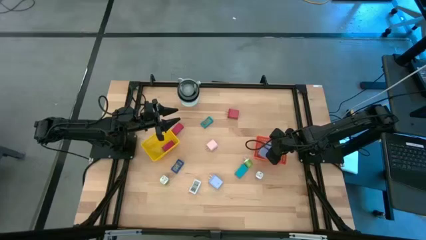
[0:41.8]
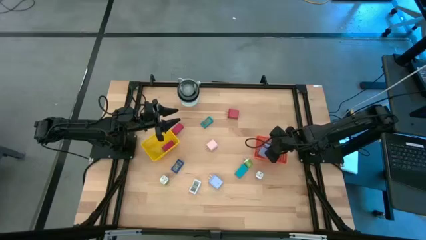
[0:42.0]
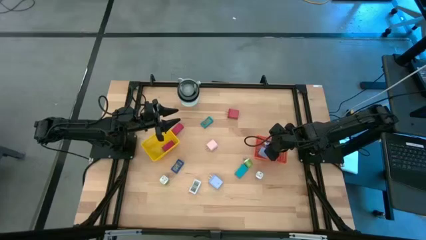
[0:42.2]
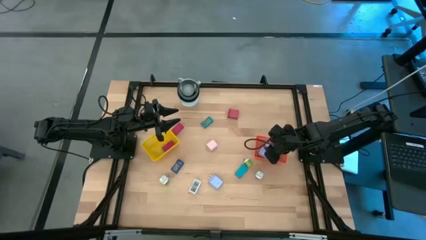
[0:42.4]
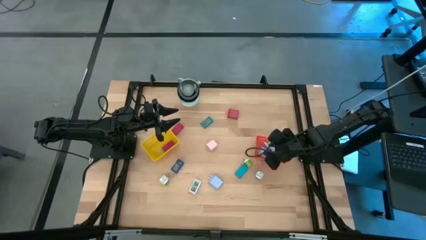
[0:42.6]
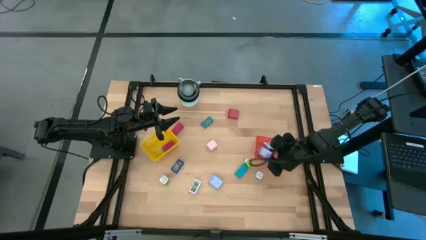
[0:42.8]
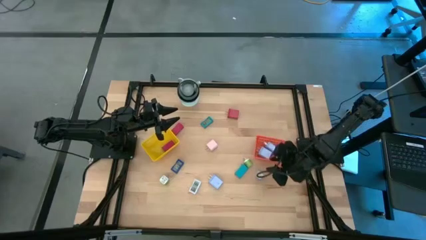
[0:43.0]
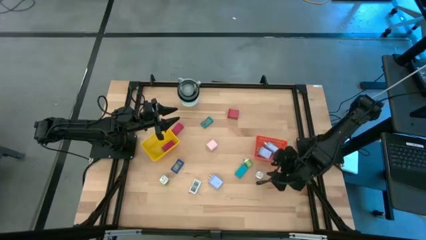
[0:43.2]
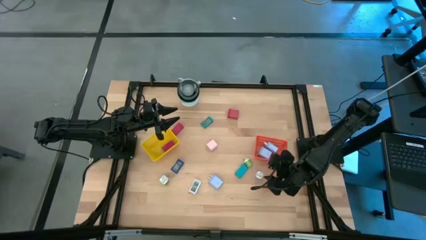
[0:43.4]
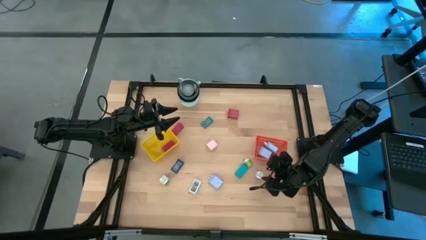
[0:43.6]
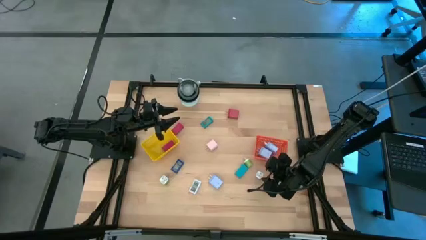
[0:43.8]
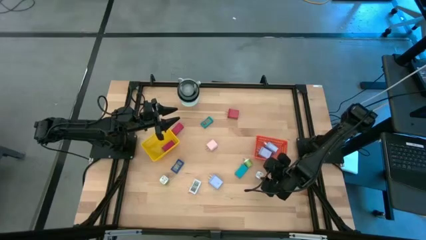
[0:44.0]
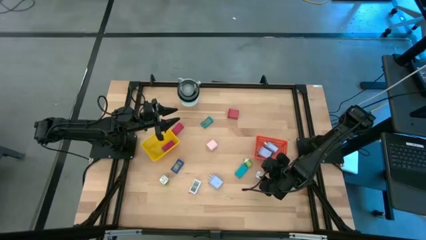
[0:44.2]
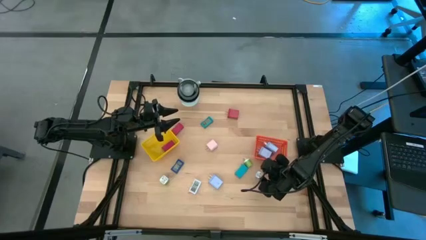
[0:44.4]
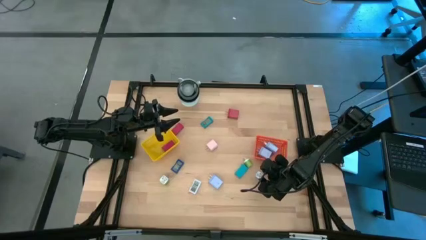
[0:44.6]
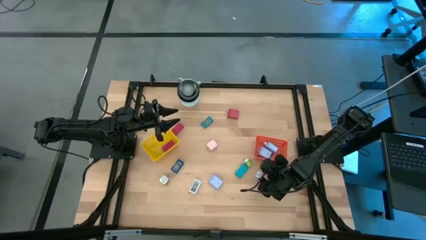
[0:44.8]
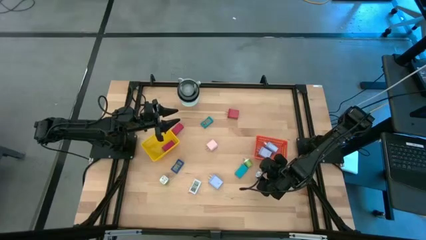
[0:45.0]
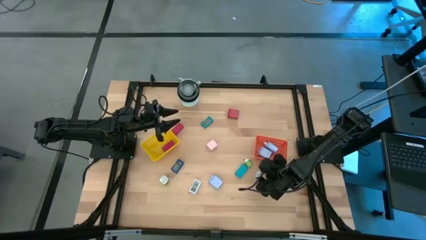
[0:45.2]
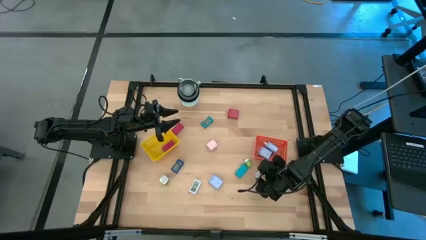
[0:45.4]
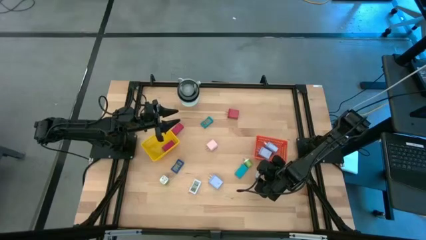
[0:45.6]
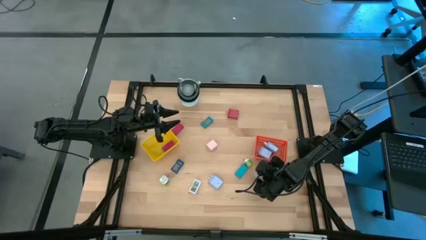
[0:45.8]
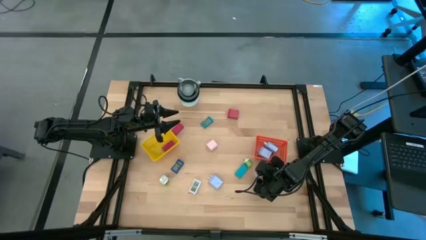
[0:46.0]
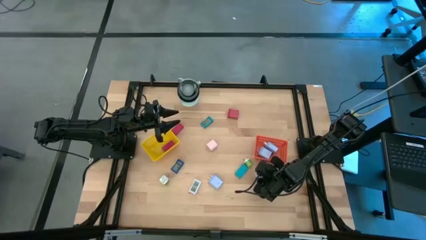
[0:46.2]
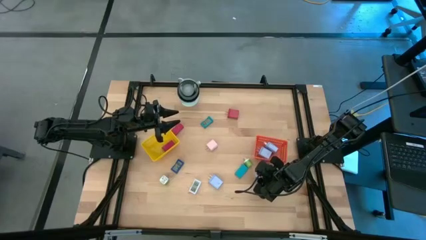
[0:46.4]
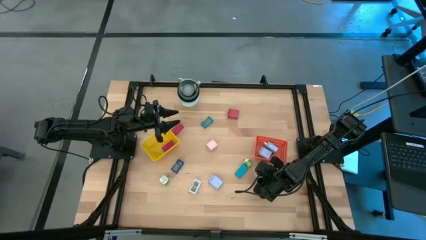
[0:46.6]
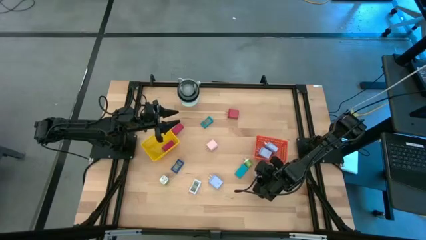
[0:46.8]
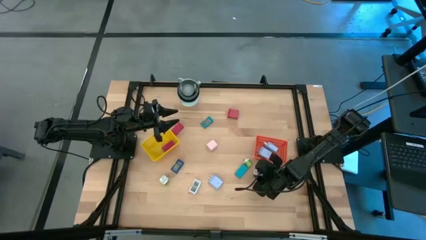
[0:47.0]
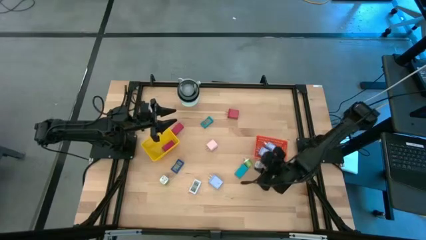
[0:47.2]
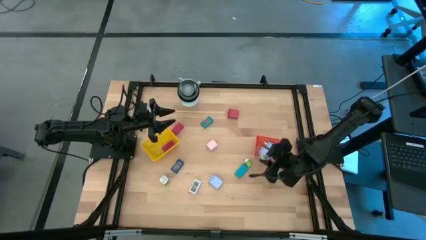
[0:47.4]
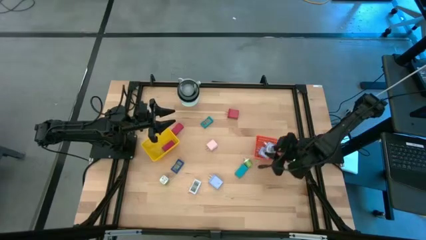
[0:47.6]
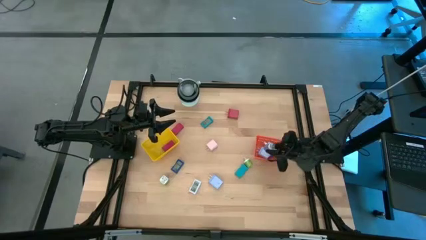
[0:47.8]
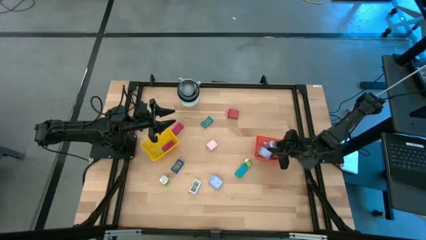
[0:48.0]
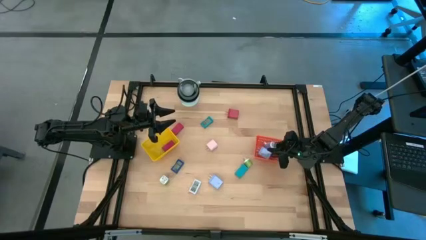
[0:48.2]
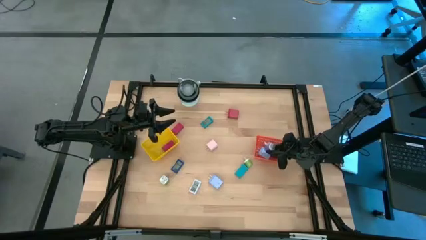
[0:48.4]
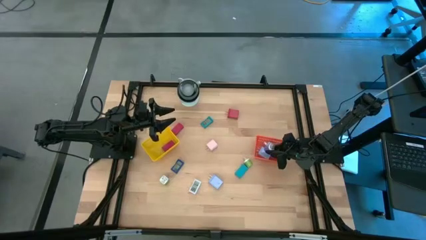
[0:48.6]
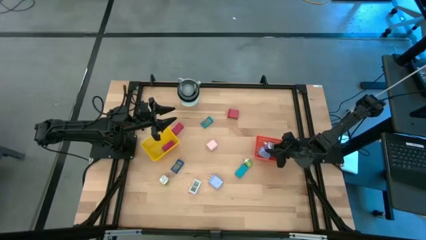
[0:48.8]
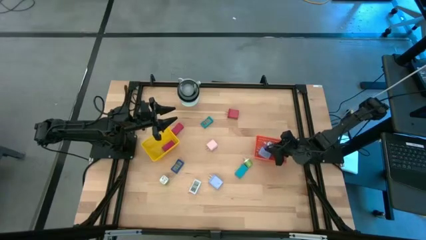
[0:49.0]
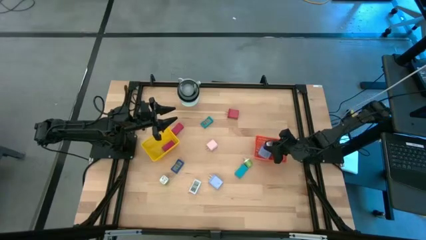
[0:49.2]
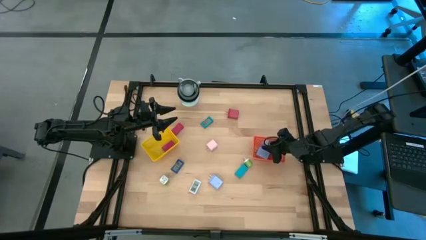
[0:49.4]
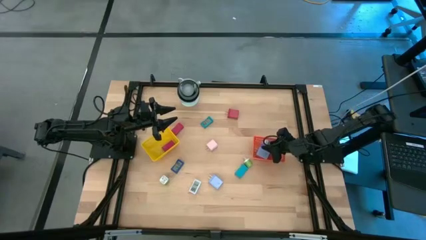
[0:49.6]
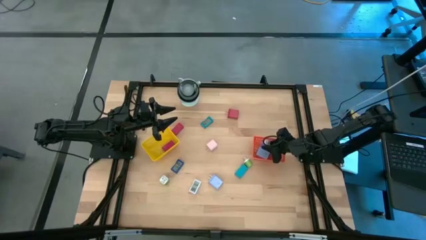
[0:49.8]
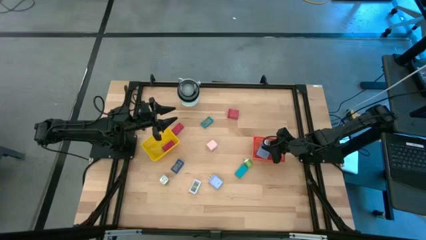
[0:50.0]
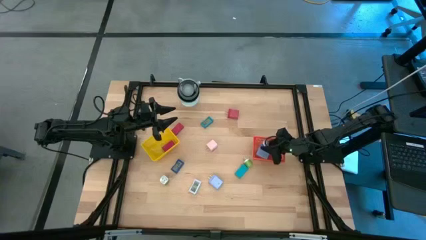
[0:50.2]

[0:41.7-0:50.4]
Task: Pick & Place Office items
Put the purple charger adapter into the orange basket

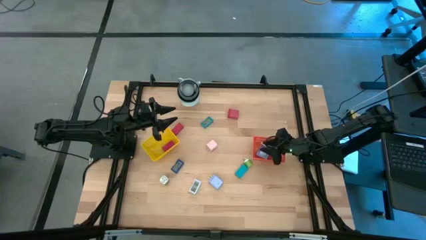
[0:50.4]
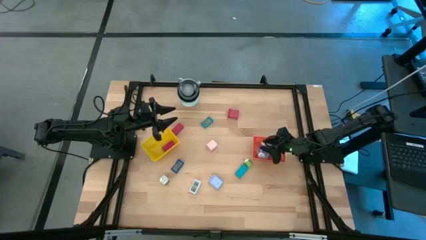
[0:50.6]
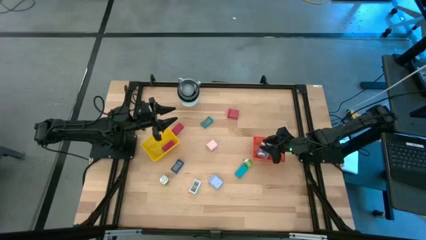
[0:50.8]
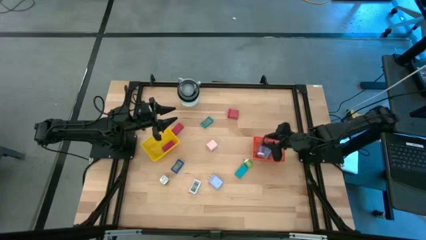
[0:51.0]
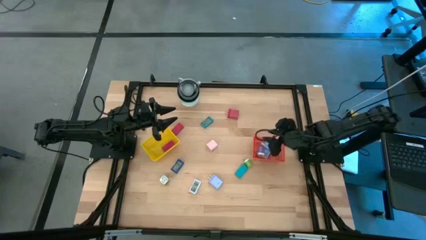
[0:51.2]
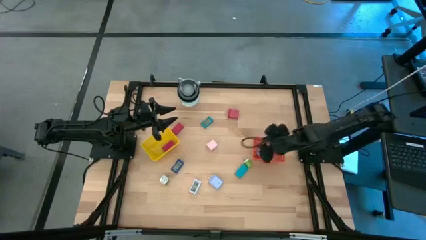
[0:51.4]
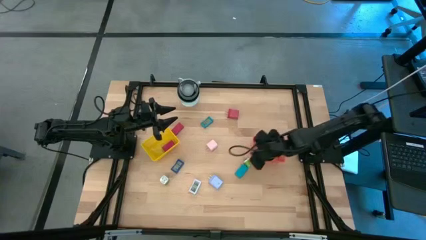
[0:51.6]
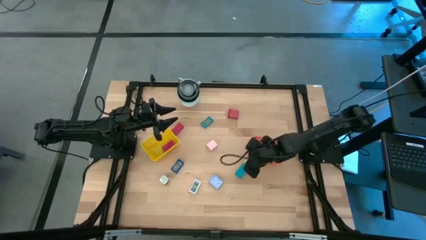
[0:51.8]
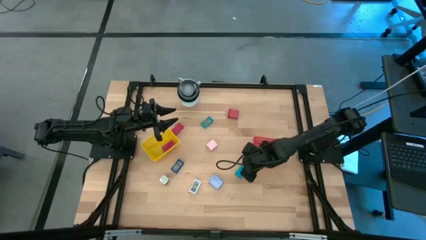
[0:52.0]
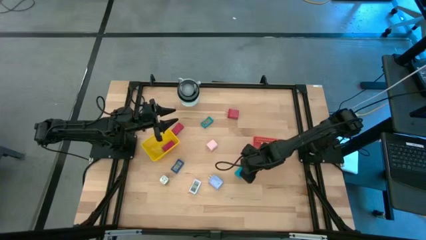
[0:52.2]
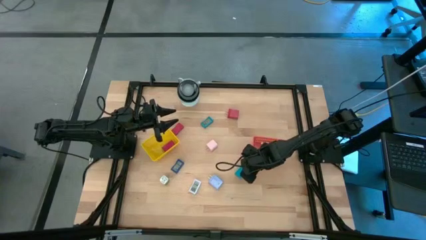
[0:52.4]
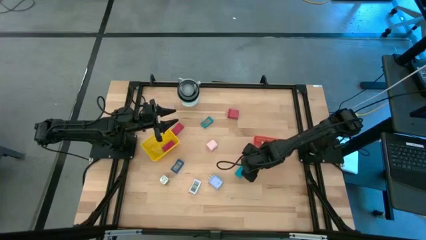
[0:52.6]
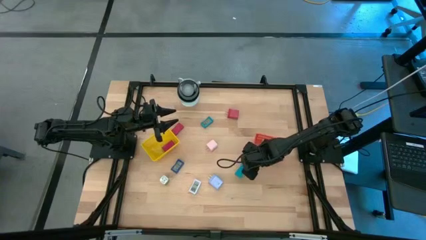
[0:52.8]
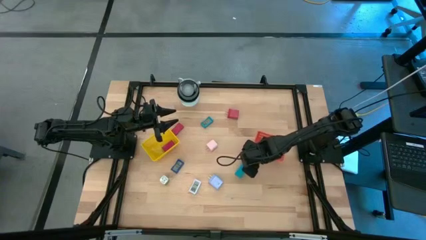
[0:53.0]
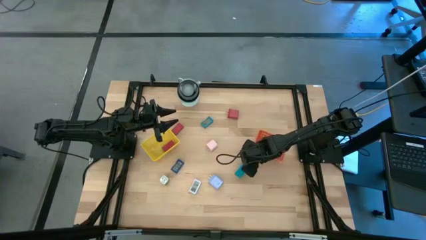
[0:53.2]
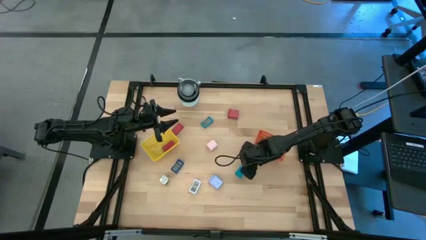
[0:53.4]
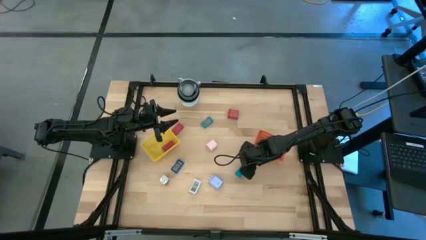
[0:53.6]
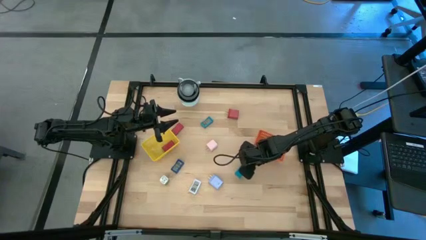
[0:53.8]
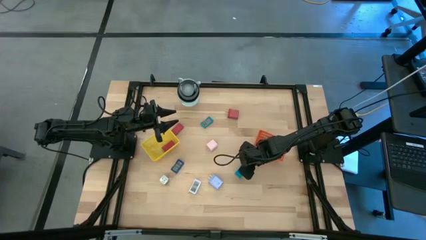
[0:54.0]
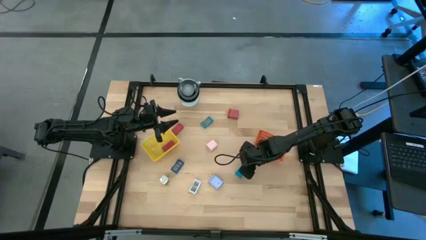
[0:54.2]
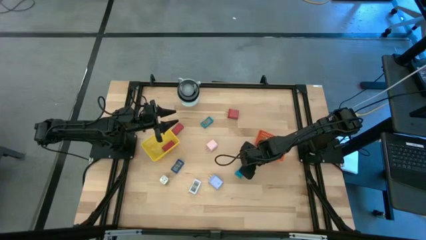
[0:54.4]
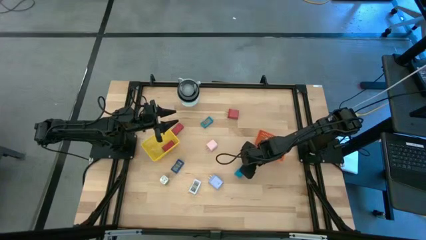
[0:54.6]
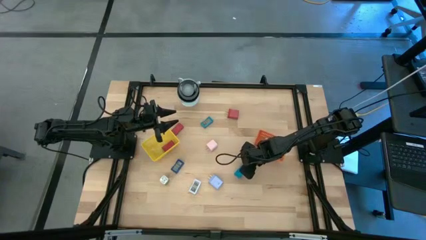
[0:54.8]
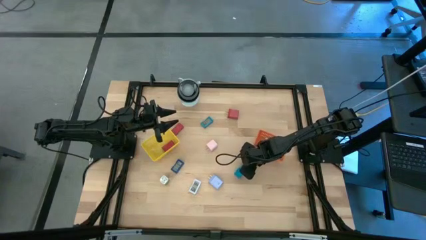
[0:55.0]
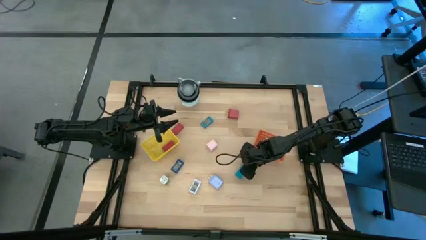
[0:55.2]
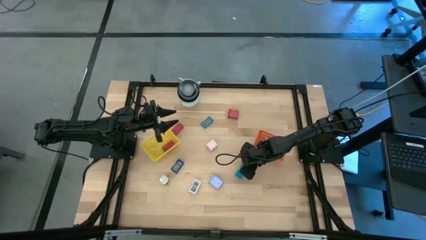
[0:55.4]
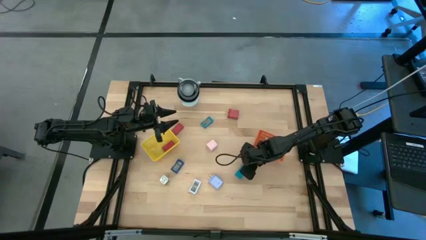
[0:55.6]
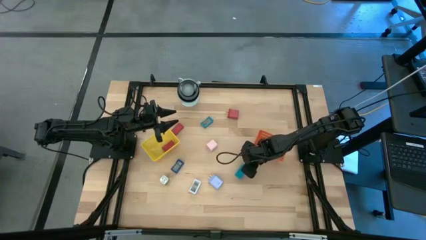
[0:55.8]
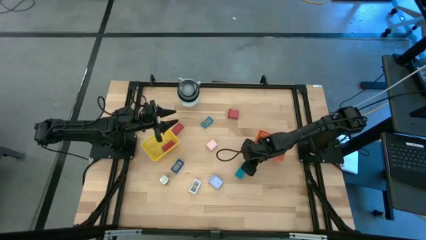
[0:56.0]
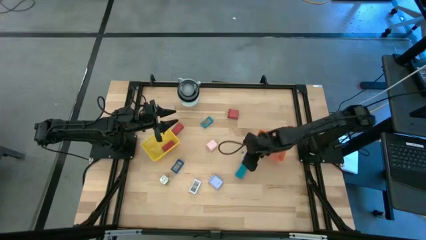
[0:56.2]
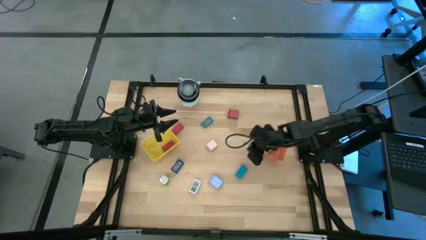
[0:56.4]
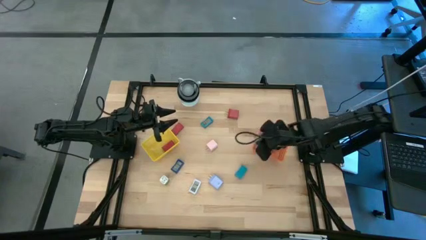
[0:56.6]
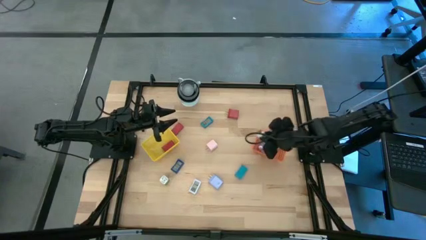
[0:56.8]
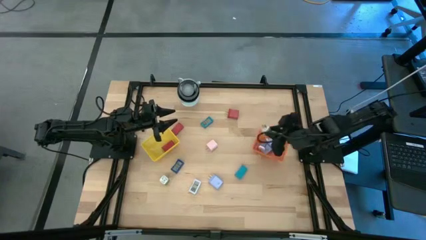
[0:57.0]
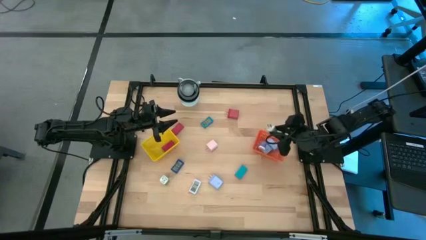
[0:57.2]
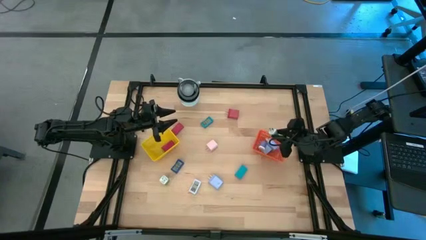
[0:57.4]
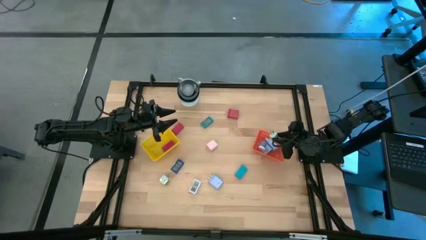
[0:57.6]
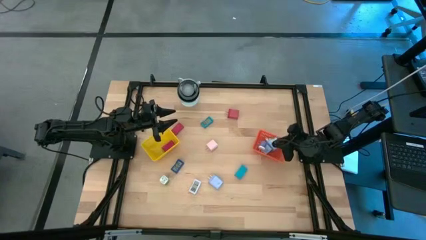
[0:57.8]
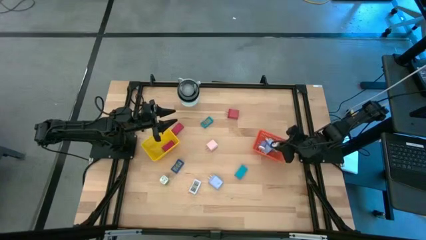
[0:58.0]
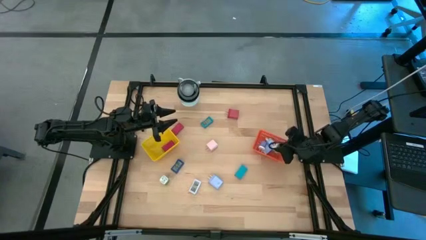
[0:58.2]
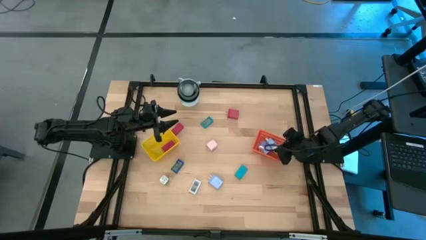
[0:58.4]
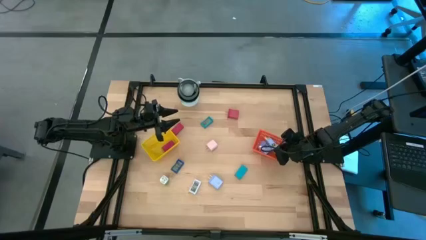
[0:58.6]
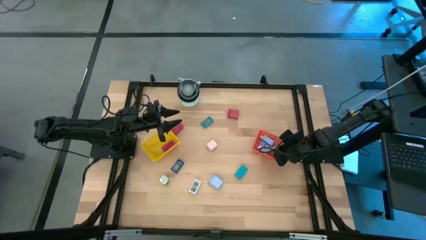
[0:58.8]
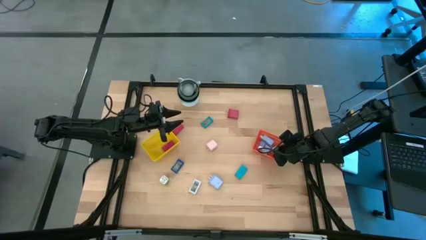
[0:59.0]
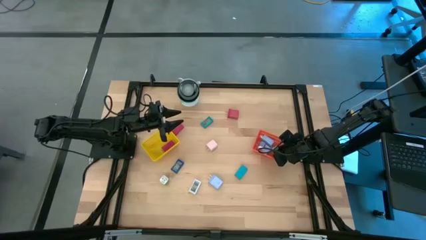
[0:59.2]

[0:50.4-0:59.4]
Put the right green charger adapter into the orange basket
